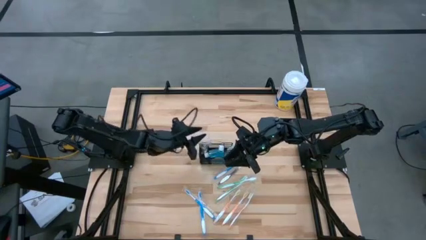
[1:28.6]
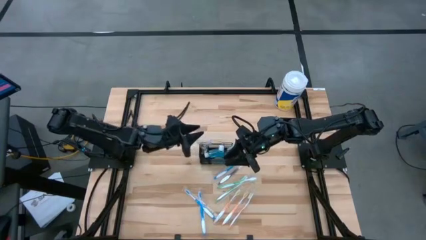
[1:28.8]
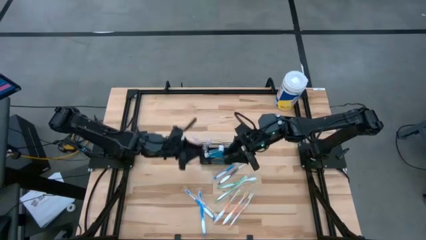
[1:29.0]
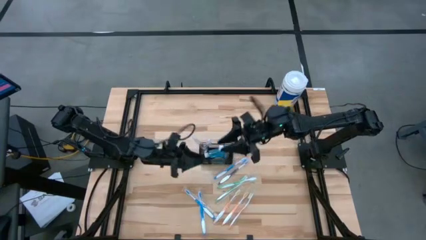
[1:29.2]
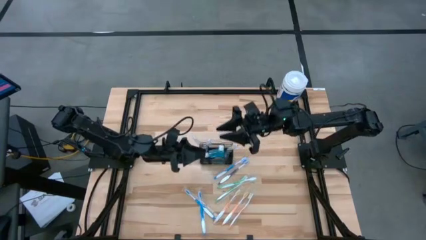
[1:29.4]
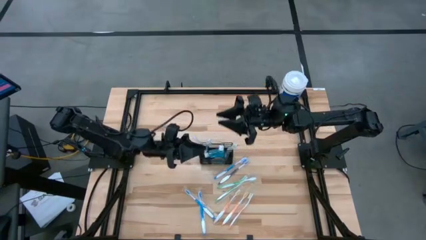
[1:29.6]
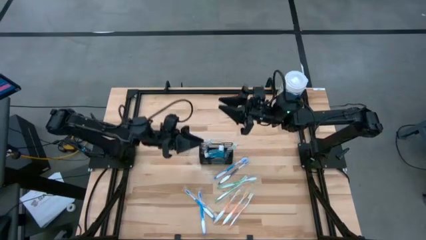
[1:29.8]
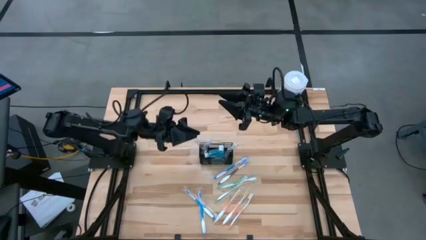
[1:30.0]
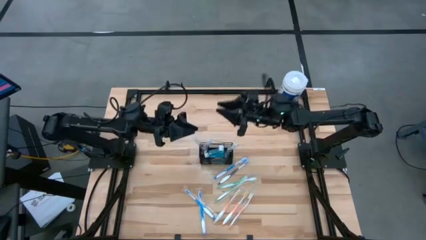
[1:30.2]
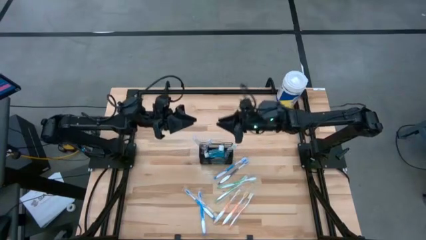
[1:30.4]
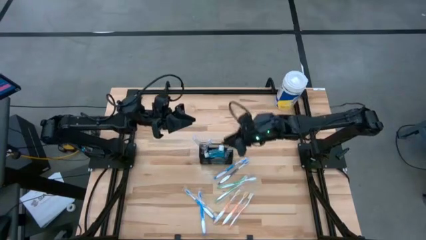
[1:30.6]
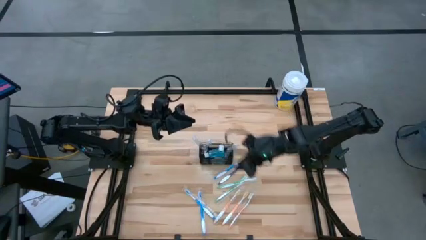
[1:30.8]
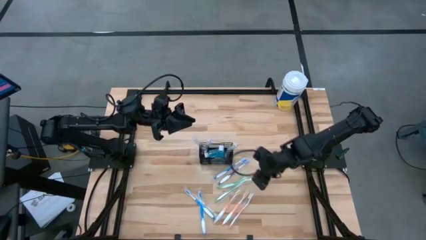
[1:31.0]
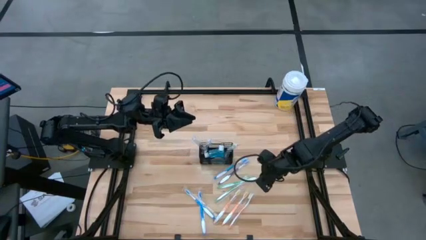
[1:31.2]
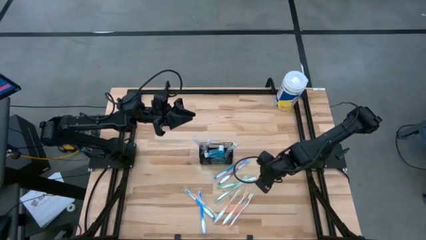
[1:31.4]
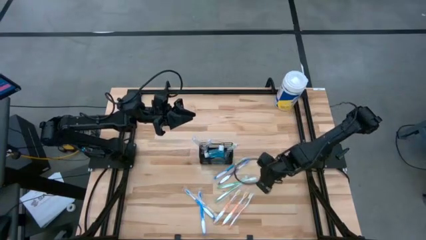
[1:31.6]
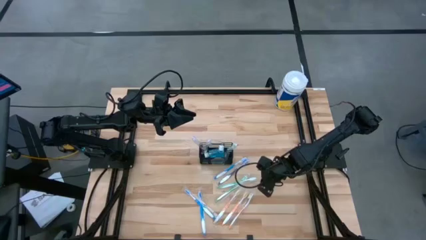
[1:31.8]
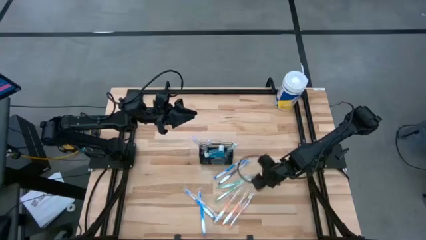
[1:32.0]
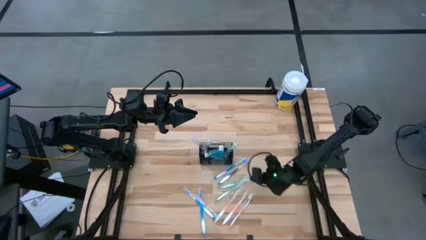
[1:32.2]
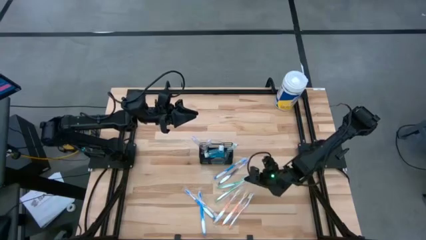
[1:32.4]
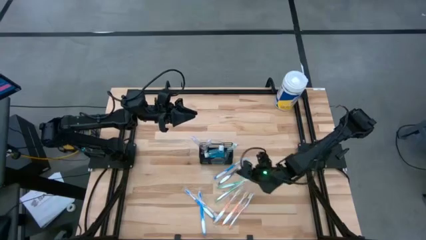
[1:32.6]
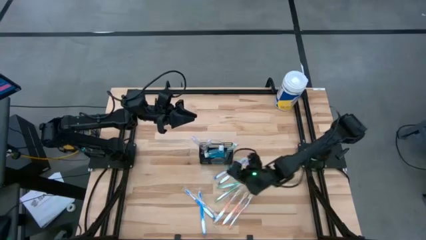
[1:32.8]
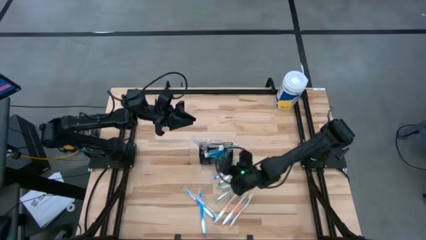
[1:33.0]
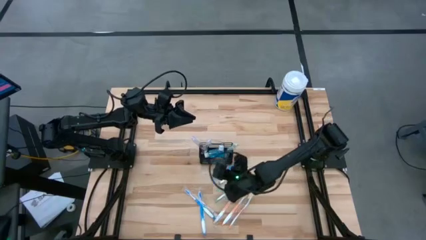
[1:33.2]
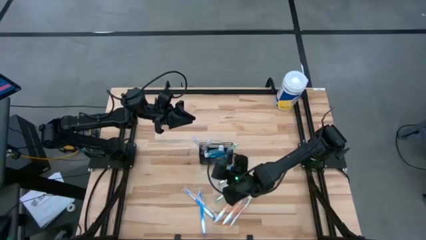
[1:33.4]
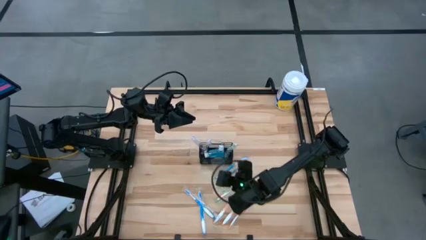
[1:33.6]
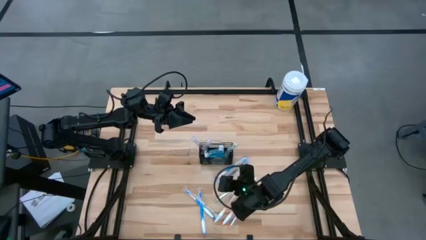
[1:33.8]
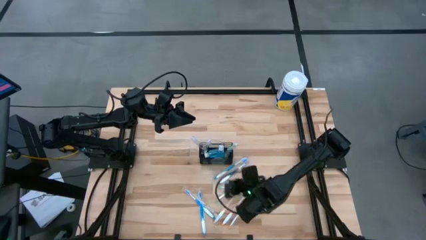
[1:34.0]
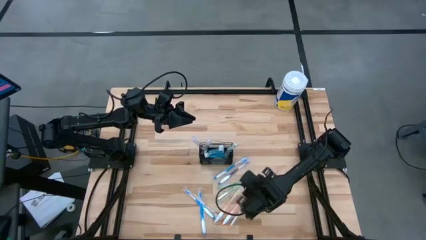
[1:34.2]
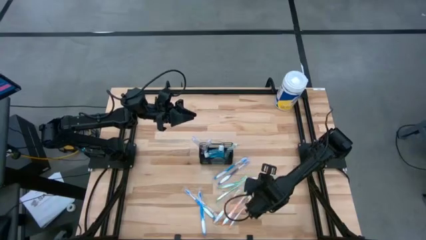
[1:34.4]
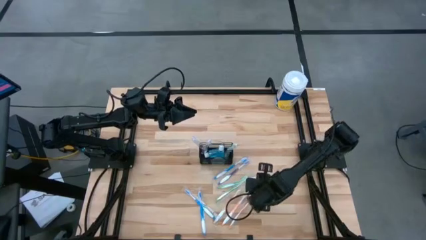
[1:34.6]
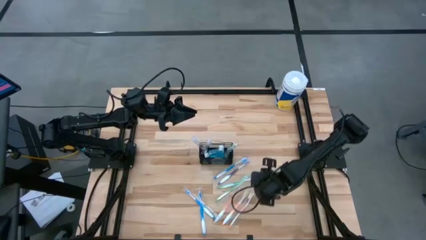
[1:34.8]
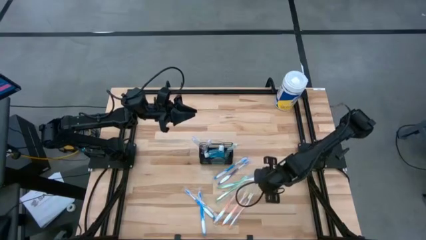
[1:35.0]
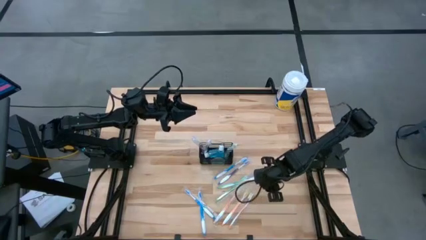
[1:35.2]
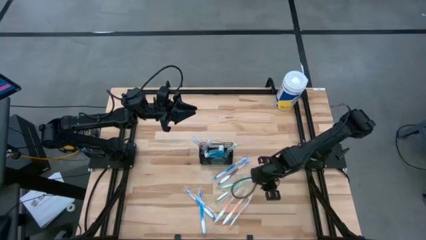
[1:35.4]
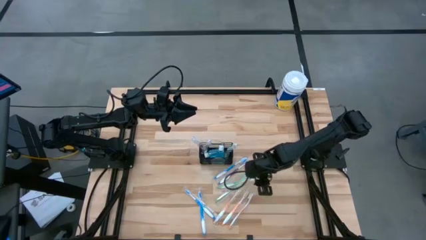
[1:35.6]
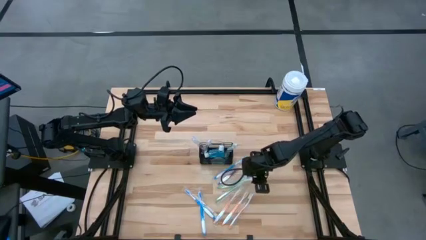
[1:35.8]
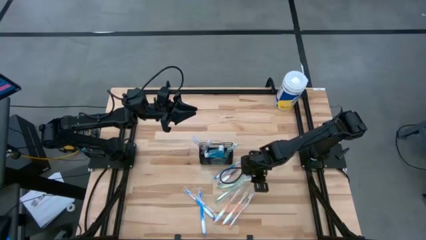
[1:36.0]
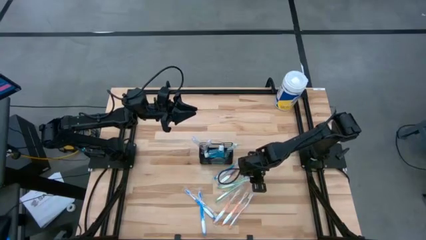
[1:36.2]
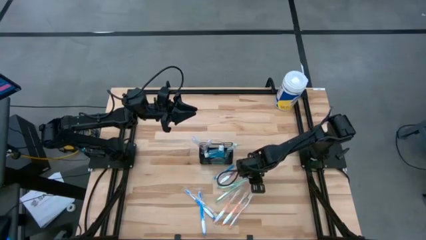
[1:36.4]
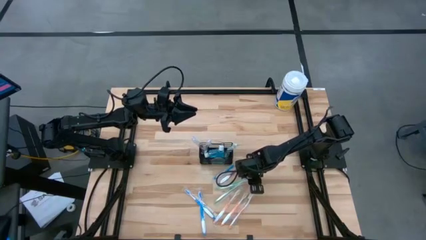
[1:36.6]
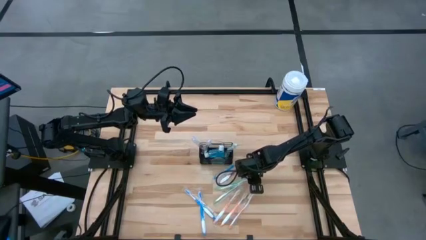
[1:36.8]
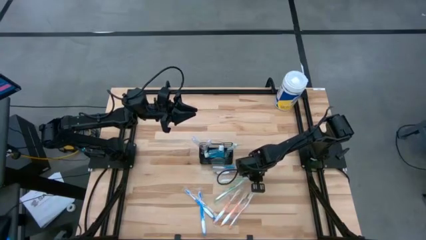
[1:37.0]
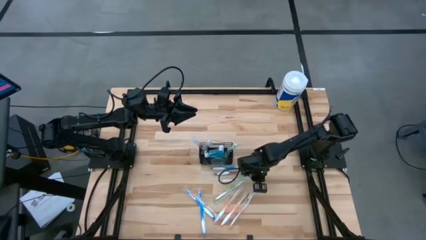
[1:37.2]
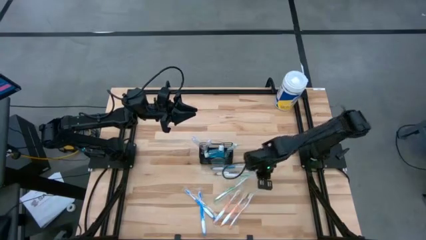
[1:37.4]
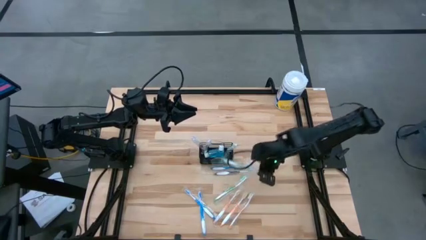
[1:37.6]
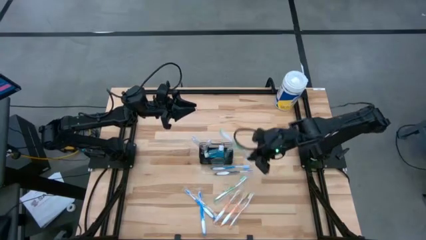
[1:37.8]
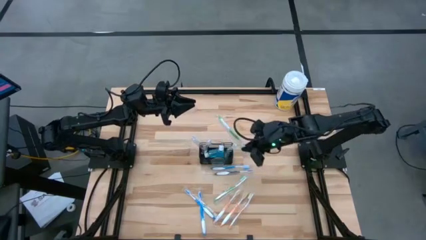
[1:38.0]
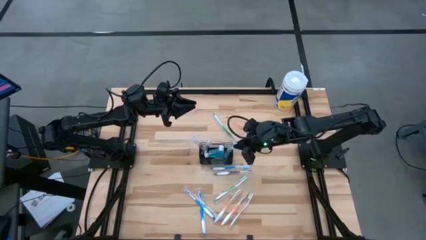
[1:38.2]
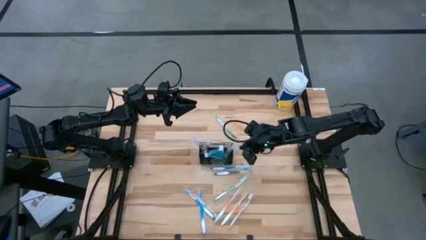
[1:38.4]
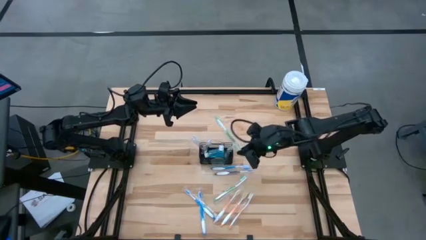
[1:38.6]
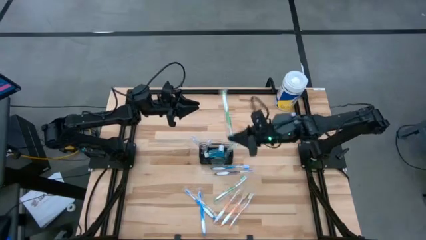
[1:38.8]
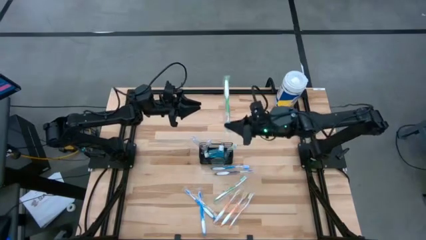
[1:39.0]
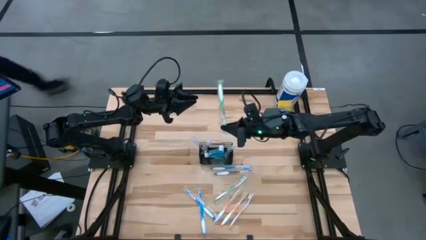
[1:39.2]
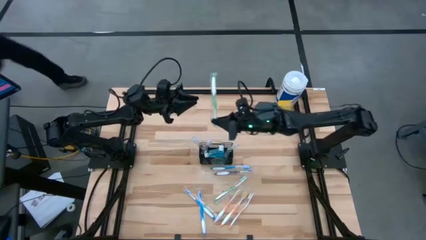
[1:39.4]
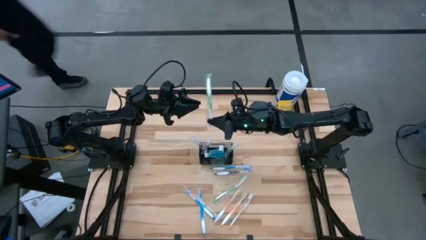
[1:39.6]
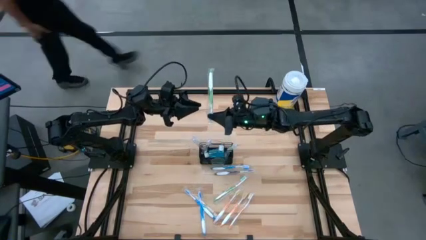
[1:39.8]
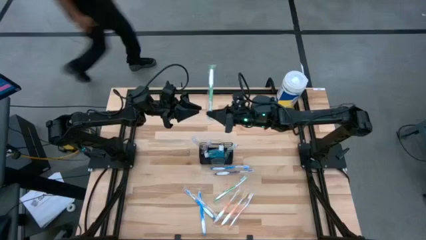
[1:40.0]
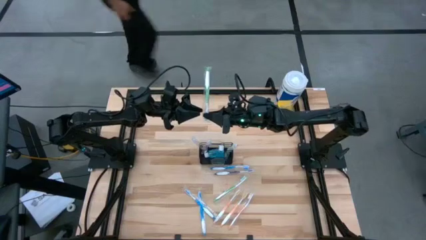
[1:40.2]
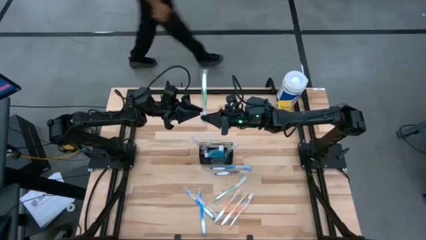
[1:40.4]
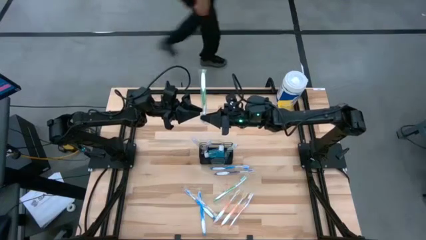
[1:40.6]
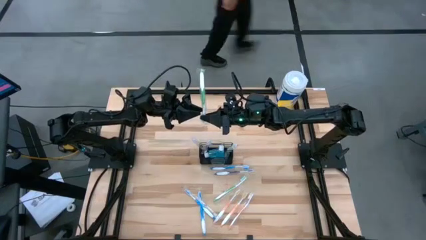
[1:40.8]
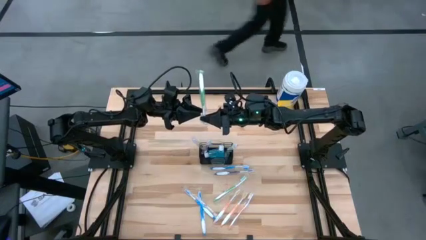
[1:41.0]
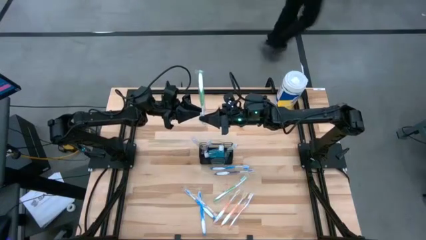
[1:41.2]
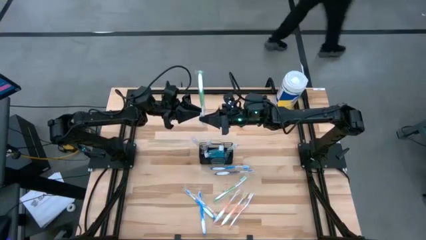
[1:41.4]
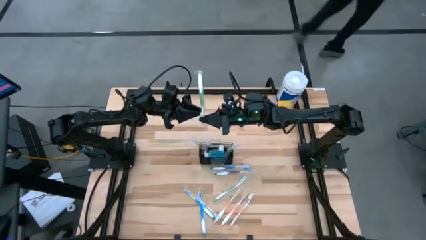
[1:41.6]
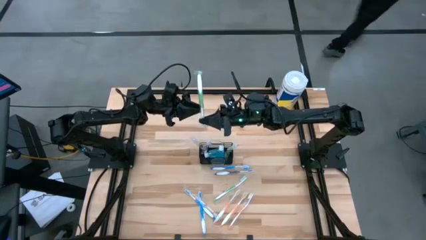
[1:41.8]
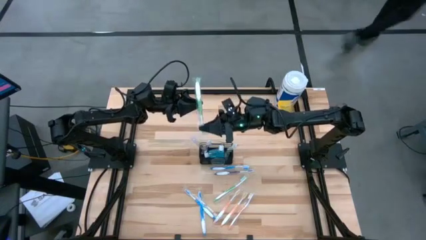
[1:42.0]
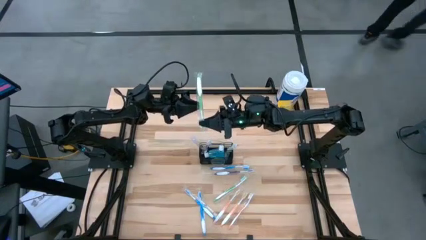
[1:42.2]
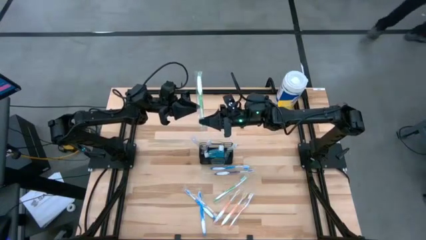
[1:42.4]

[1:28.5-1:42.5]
Task: Pick & Place toothbrushing station
Put the green toothbrush into the black wire organizer

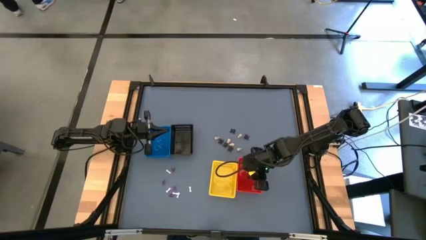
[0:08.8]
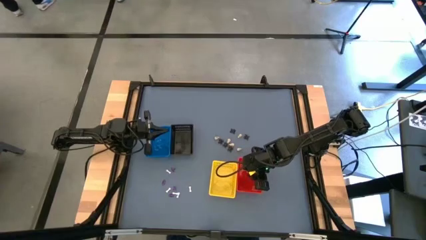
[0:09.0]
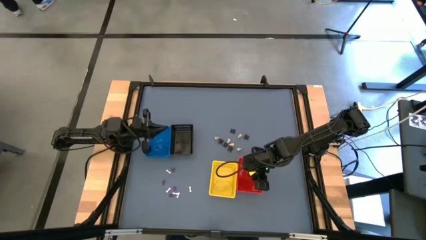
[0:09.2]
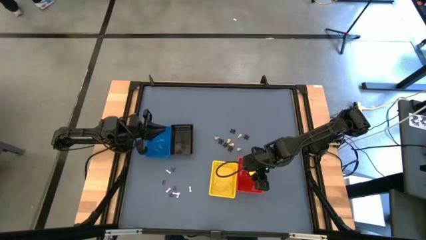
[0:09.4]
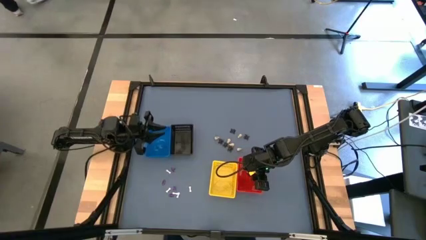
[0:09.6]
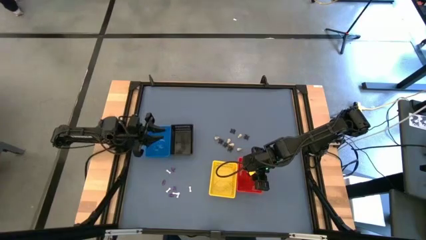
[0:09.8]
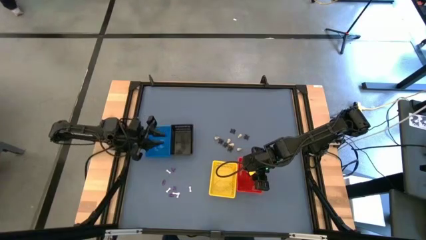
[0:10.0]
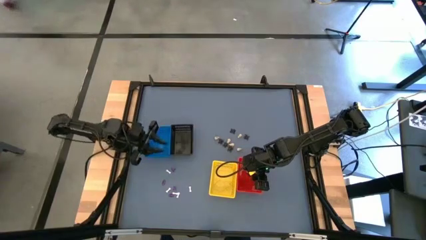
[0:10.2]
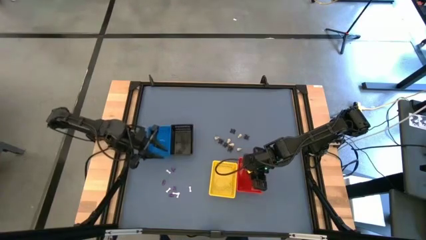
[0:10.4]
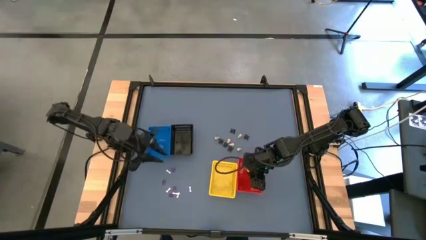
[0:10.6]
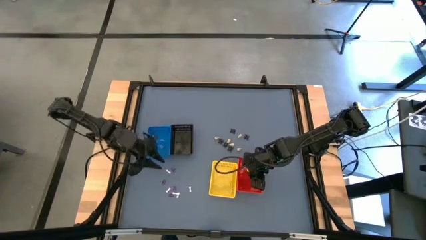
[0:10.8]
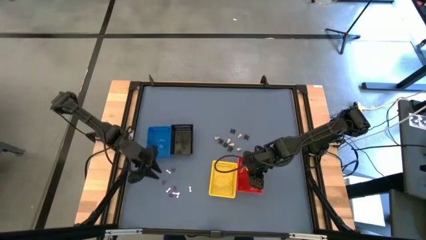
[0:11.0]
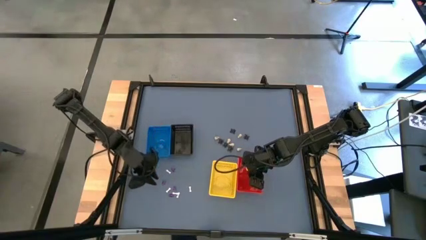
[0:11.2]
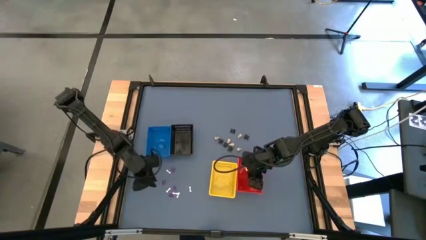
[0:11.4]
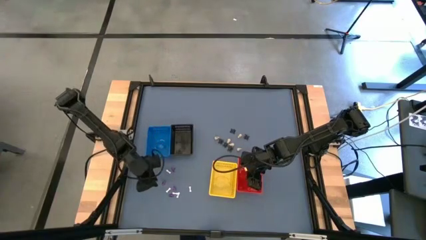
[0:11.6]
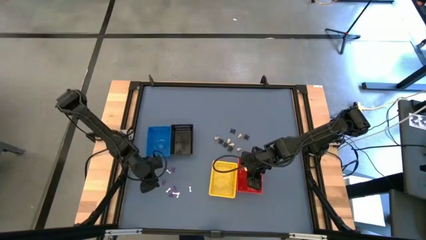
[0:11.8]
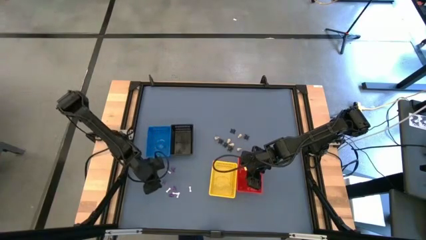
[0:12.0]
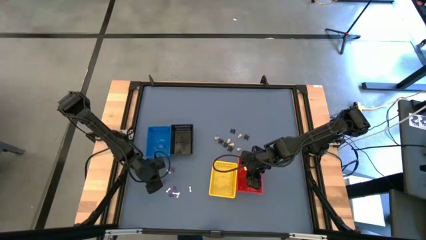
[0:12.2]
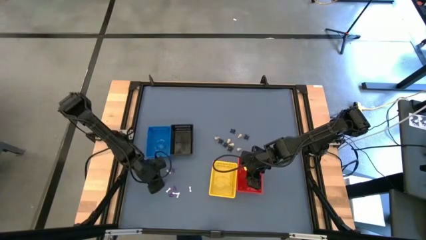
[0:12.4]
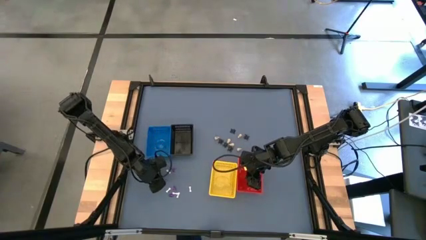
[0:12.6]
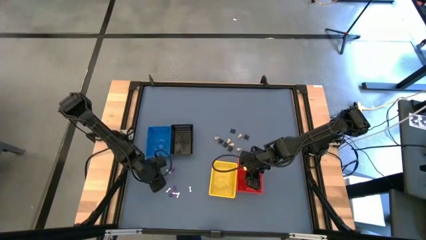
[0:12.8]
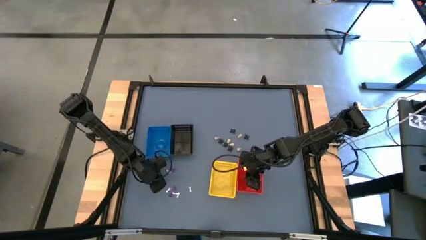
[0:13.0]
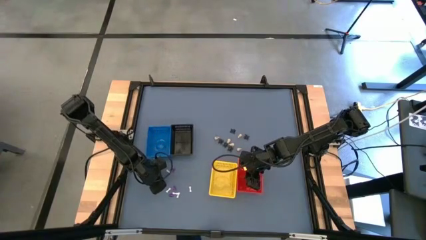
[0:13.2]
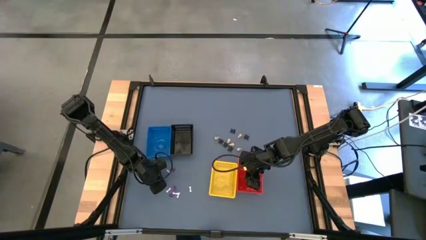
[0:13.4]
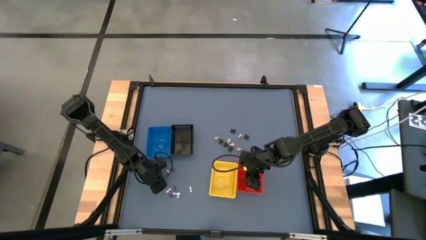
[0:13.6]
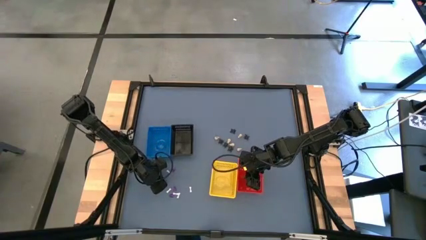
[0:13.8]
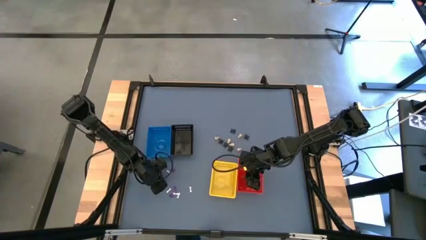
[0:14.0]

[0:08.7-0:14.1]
Task: Sort Halloween decoration
Put the witch hat toy into the black bin
